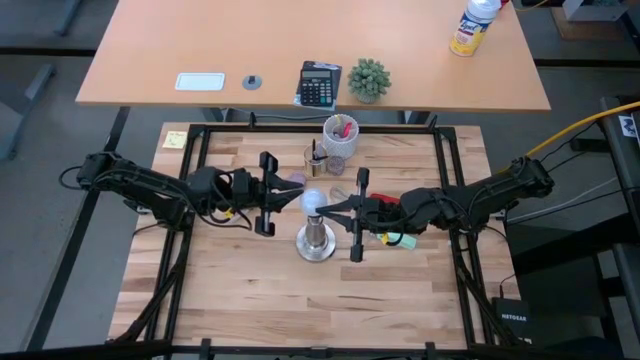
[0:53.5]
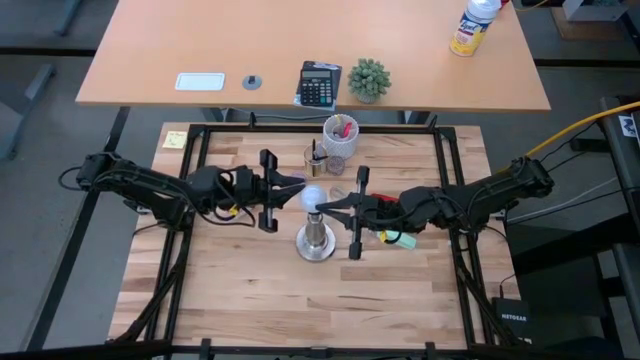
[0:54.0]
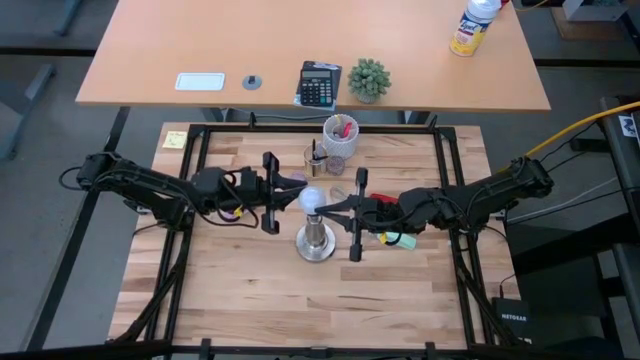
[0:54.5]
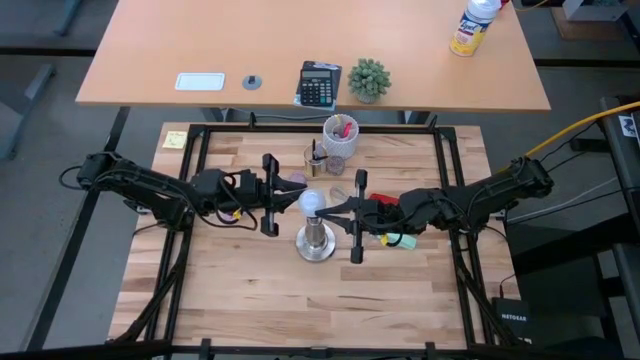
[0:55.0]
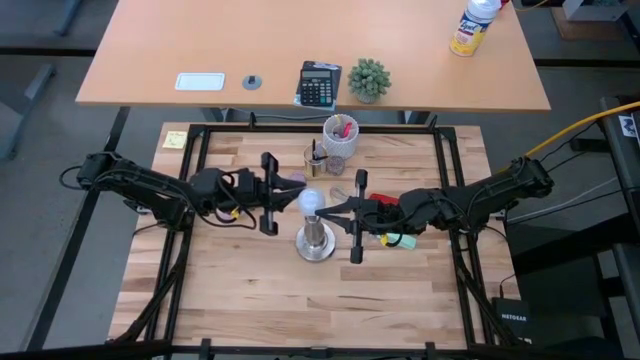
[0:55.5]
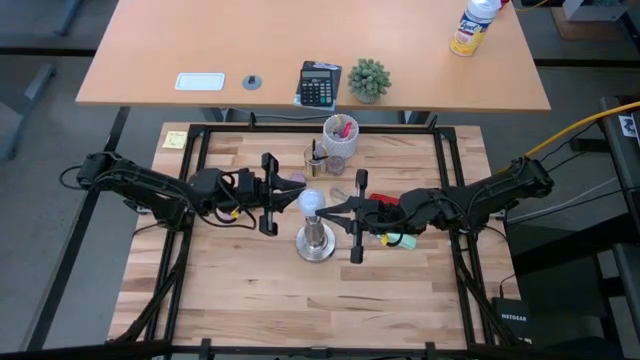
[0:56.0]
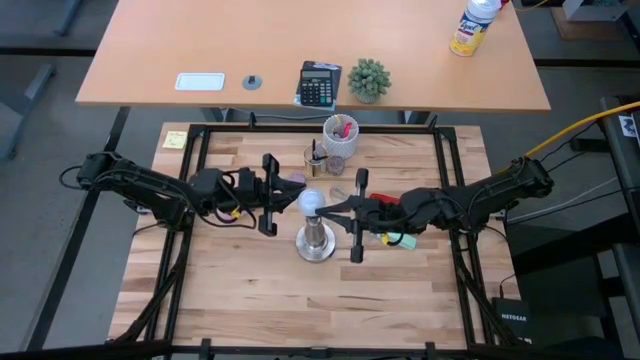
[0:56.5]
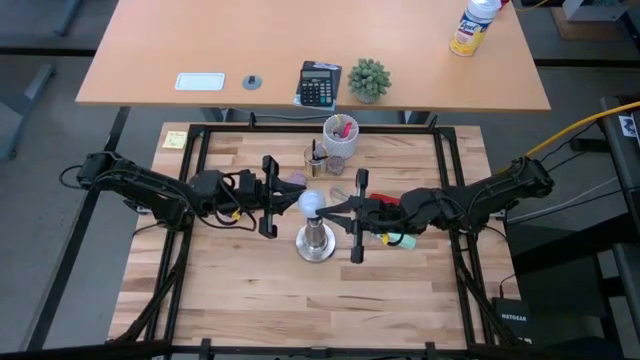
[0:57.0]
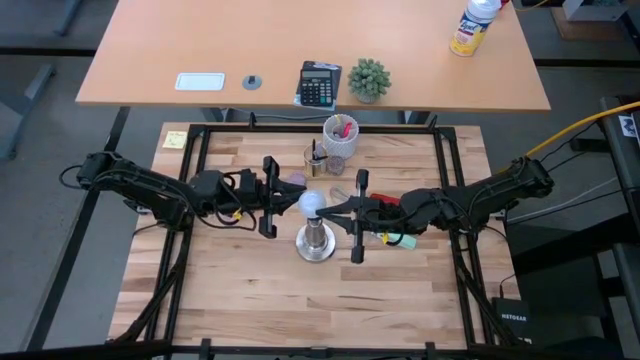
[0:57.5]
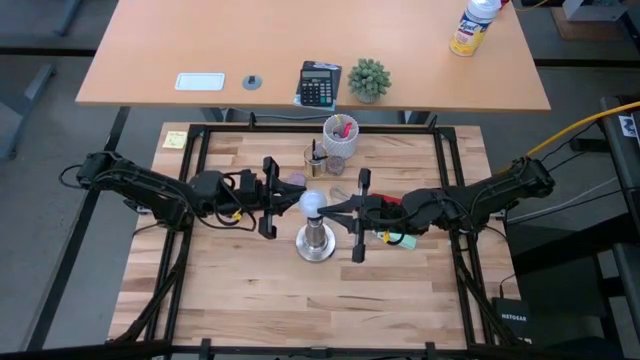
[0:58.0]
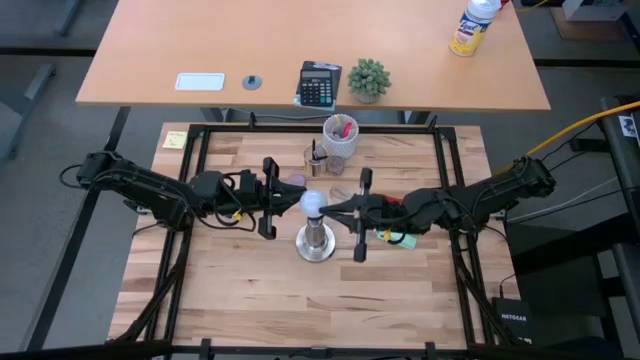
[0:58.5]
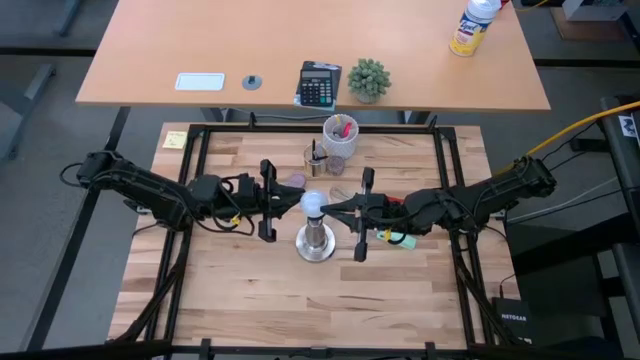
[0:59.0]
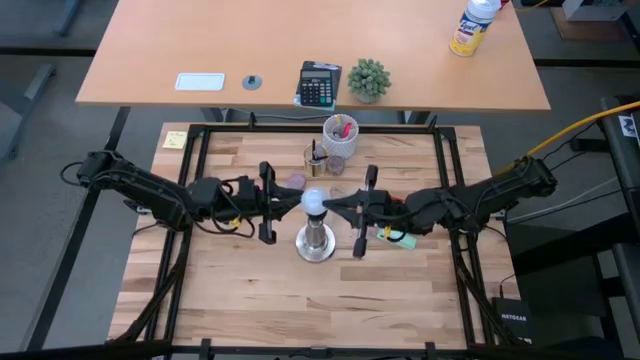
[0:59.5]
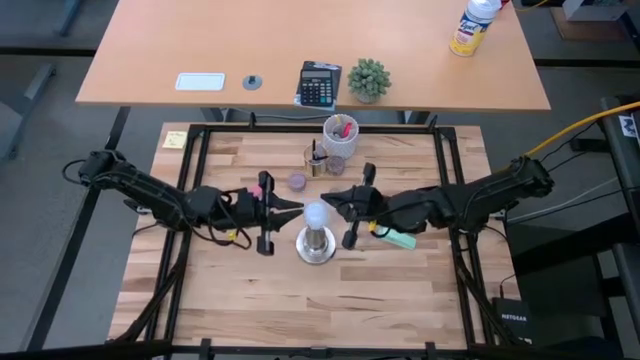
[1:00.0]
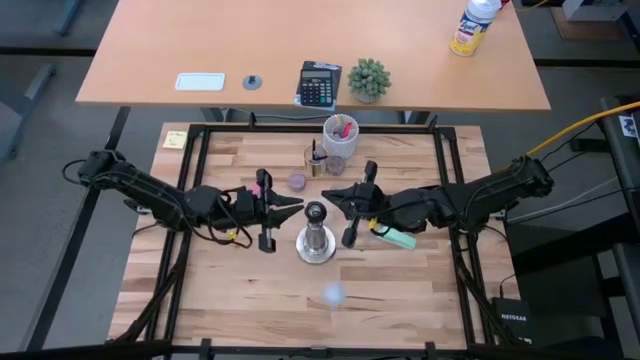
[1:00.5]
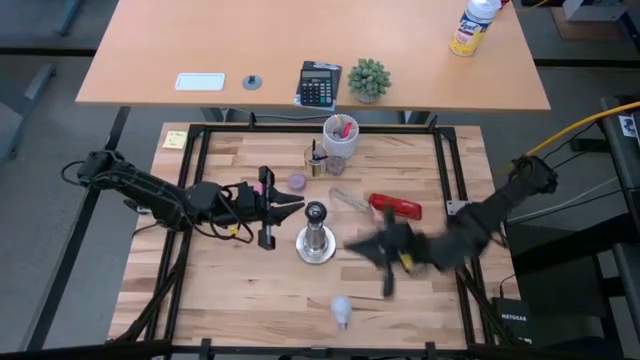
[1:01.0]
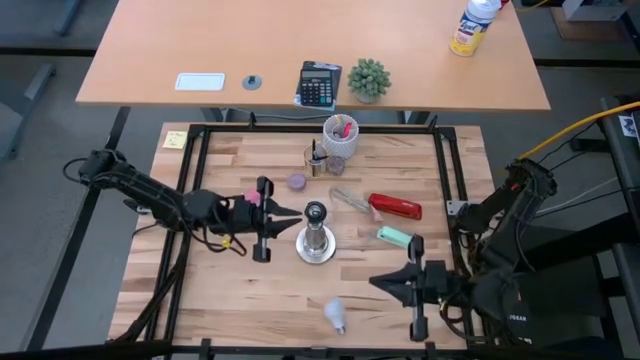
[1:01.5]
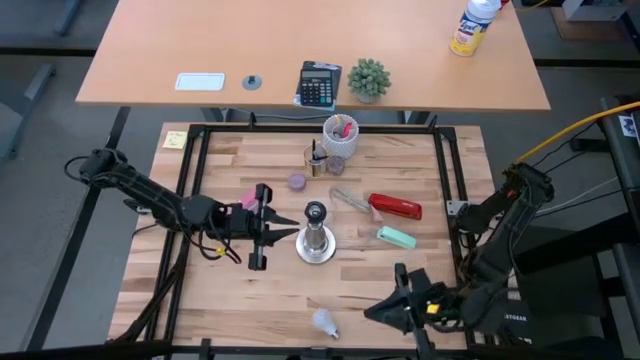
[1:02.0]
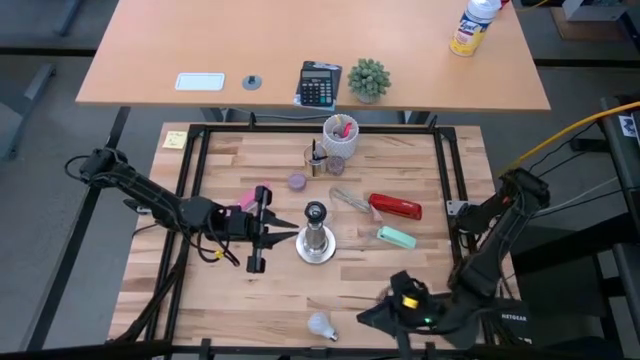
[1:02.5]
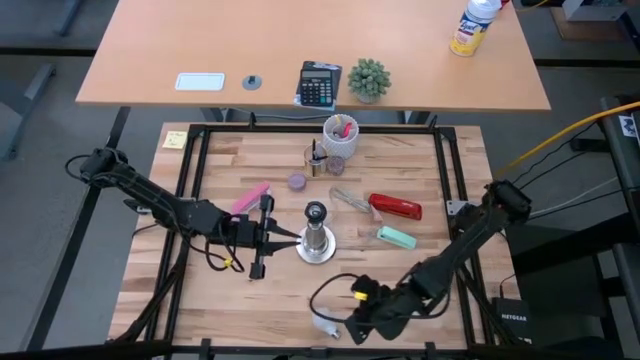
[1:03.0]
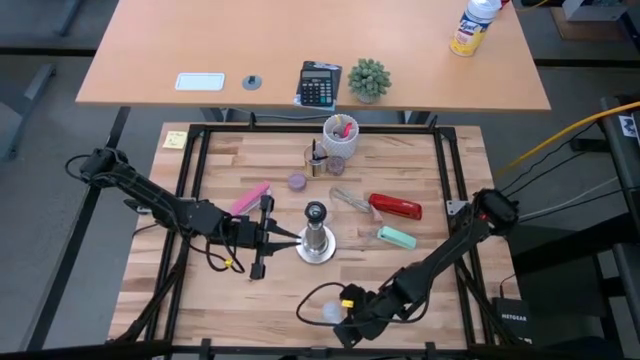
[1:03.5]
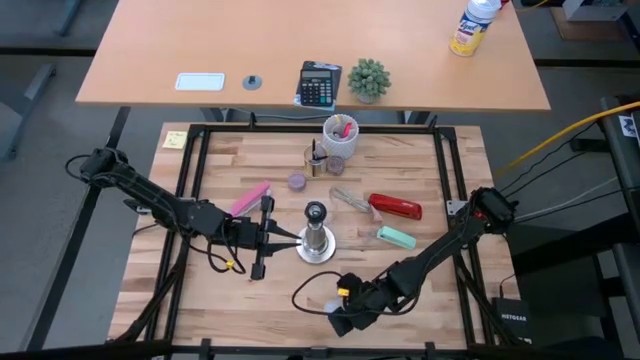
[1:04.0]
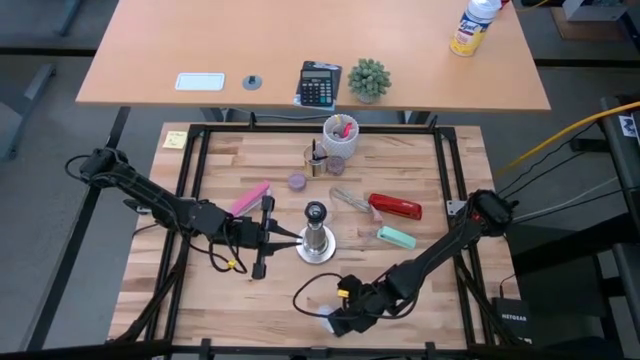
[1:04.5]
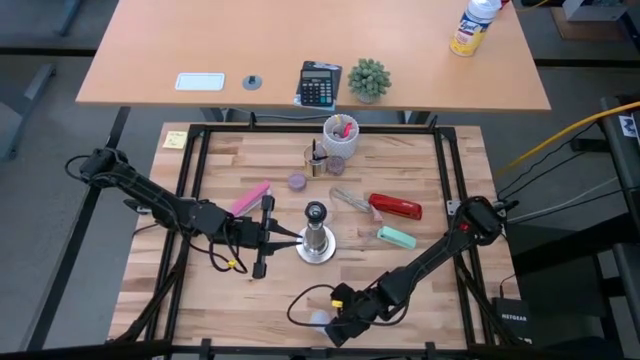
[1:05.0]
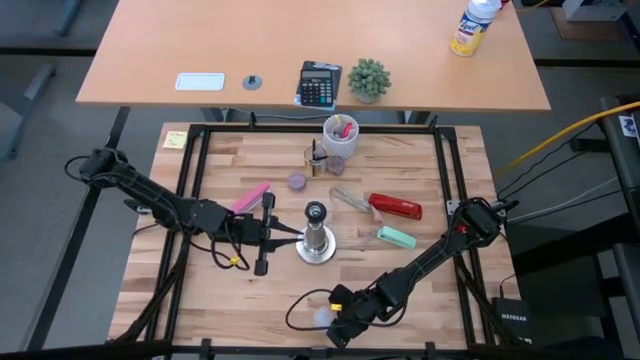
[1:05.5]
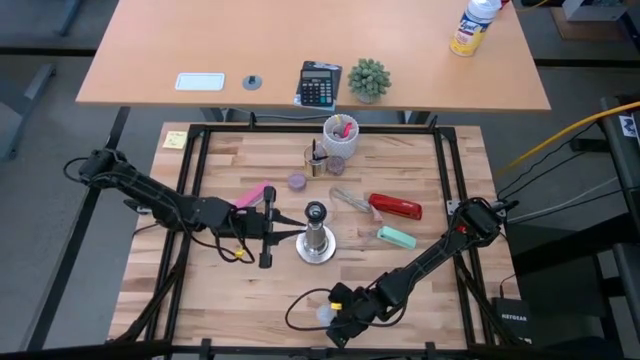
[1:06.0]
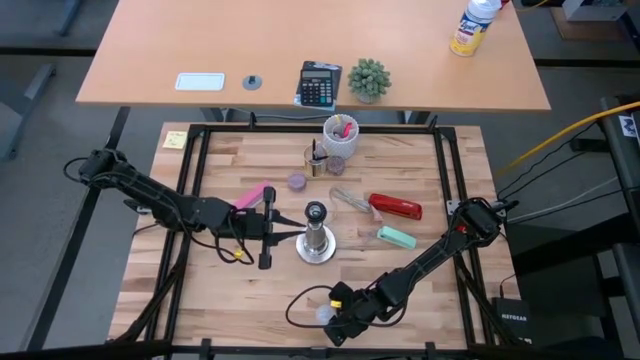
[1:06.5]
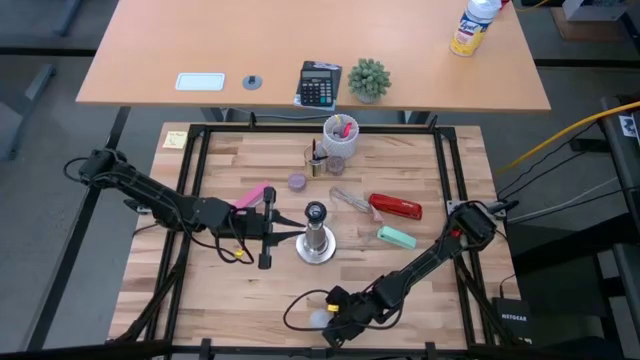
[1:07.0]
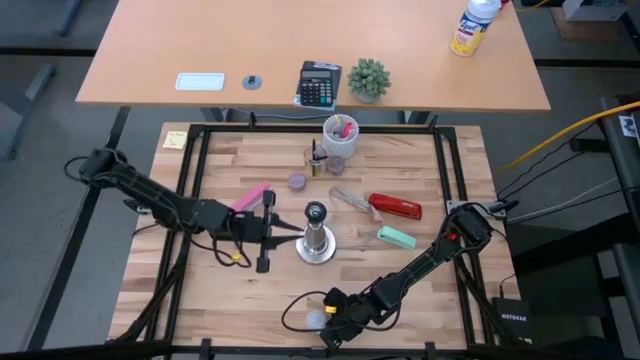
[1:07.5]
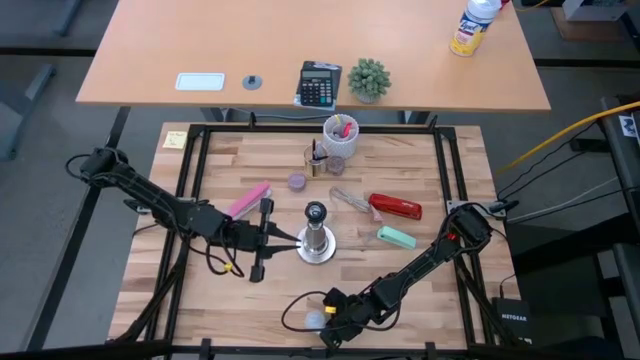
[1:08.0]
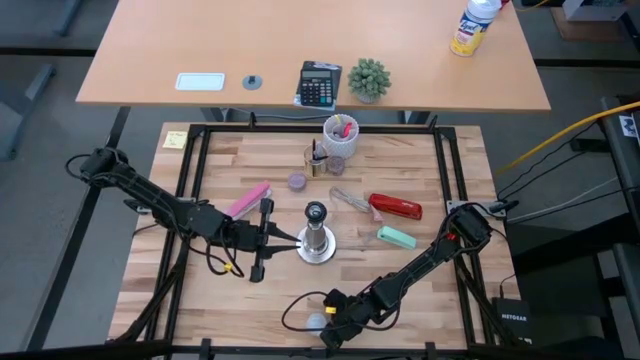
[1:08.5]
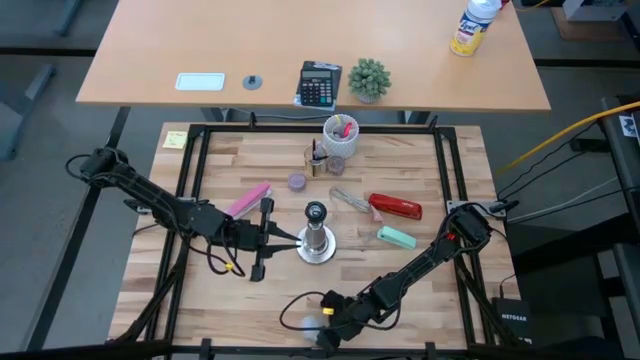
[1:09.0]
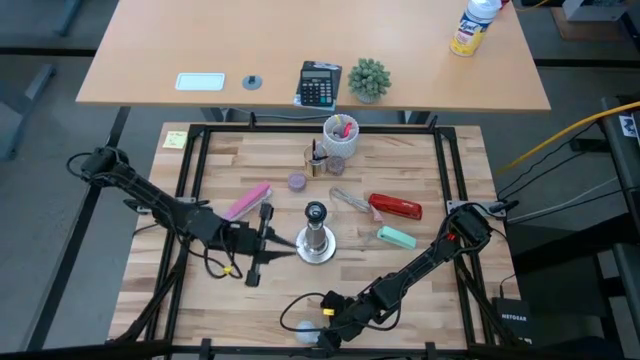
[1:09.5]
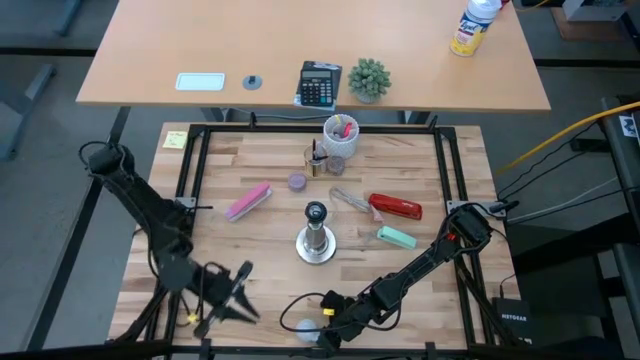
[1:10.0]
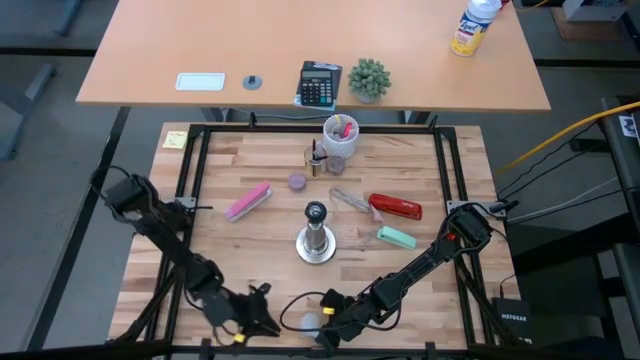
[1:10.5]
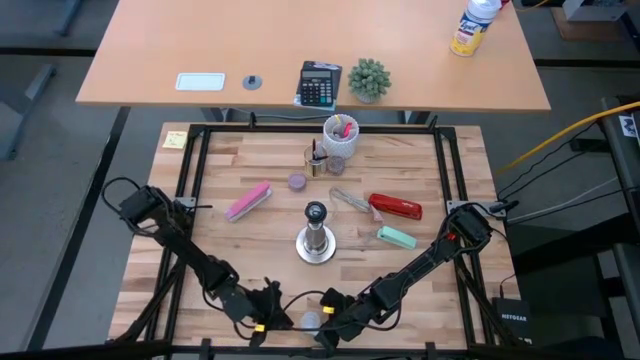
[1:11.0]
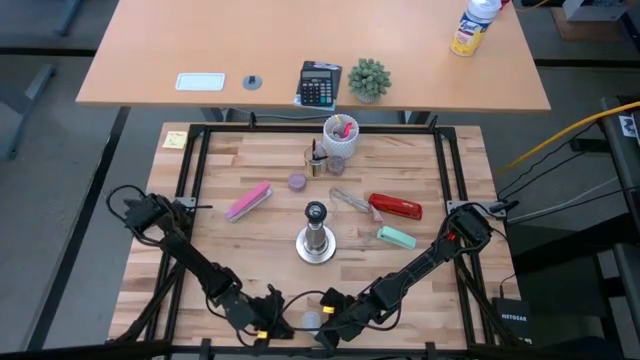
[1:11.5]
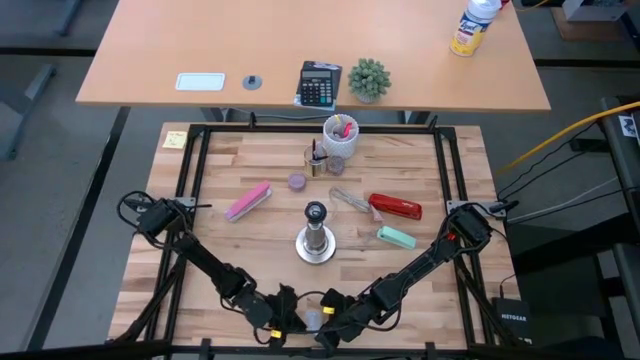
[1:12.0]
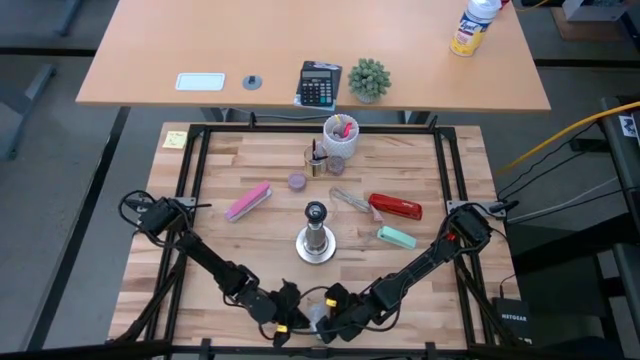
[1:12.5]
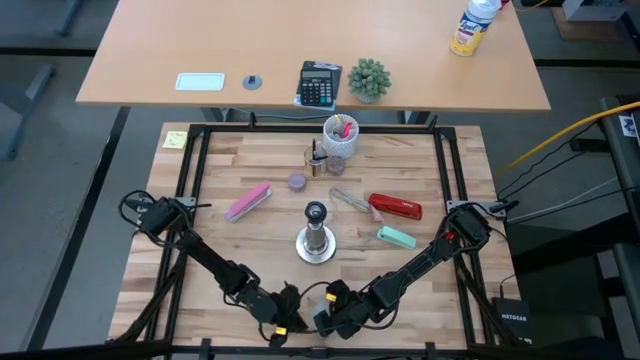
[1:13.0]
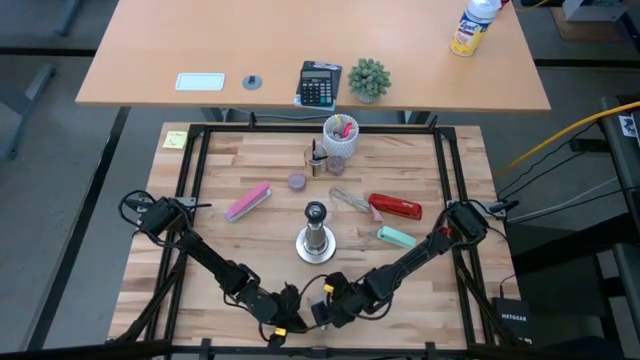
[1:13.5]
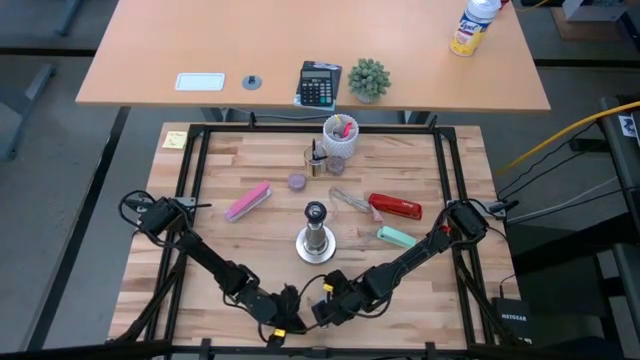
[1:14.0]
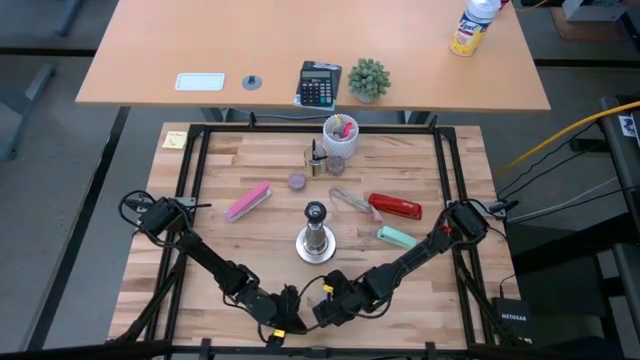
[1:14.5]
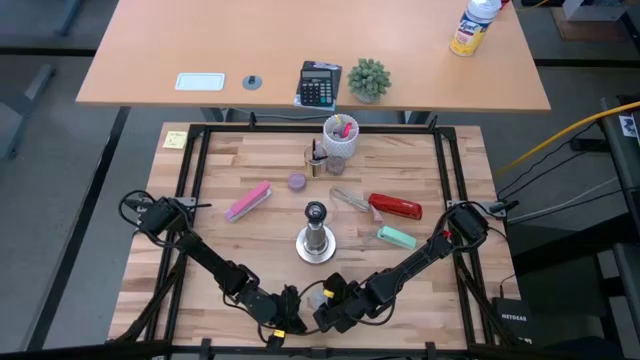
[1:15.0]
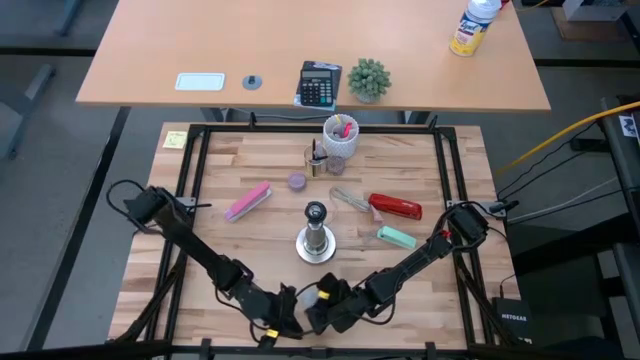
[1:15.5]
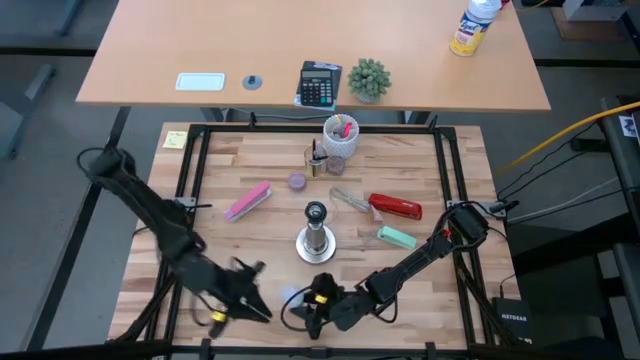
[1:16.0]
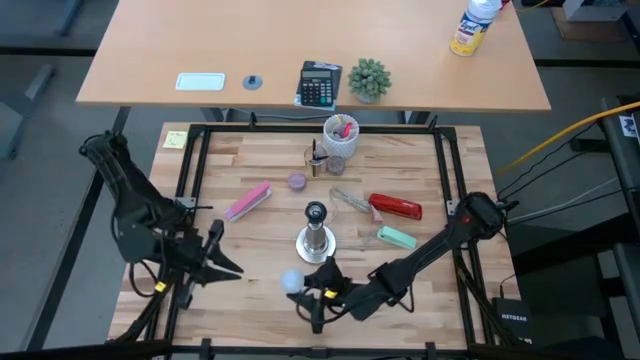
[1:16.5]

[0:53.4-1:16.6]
Task: Screw lightbulb
Insert the lightbulb into the lamp socket
